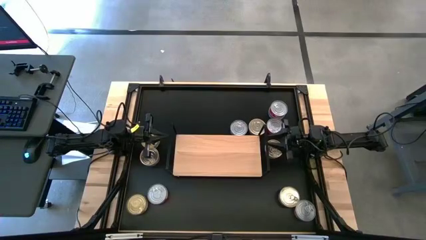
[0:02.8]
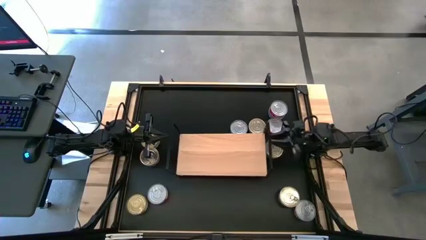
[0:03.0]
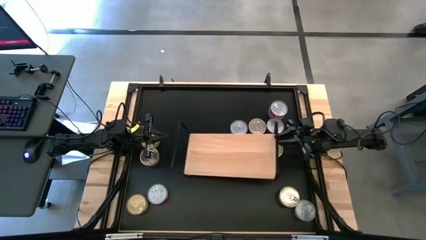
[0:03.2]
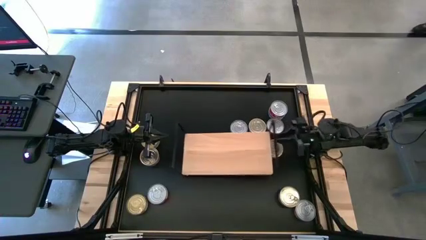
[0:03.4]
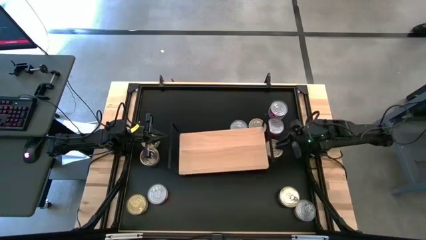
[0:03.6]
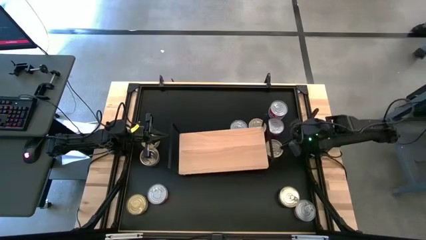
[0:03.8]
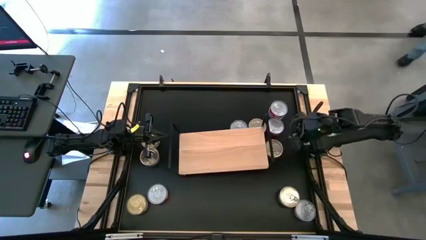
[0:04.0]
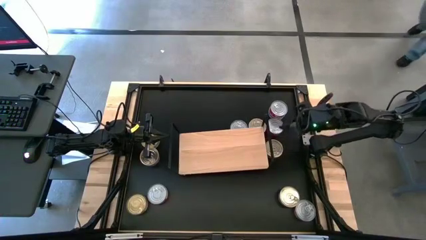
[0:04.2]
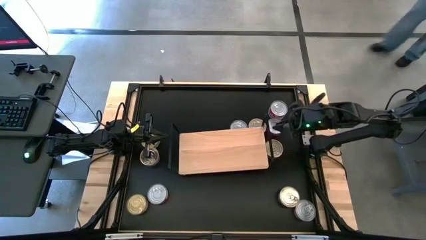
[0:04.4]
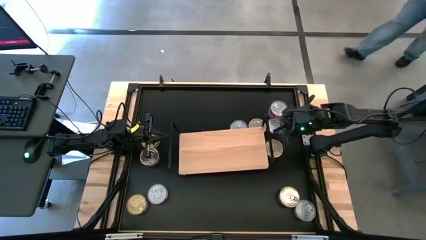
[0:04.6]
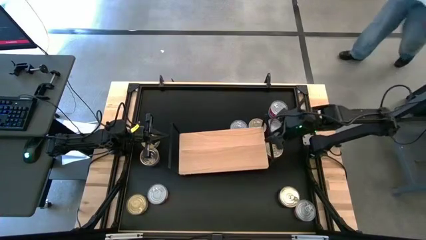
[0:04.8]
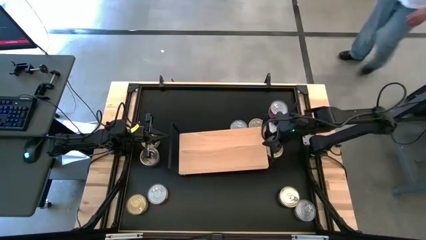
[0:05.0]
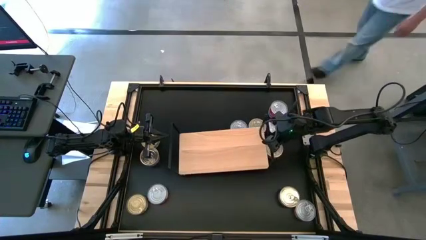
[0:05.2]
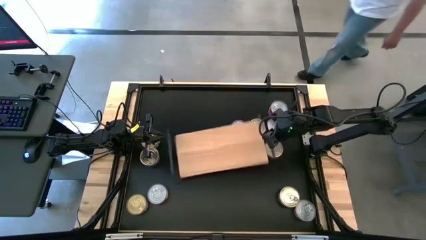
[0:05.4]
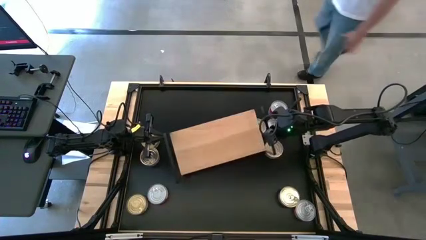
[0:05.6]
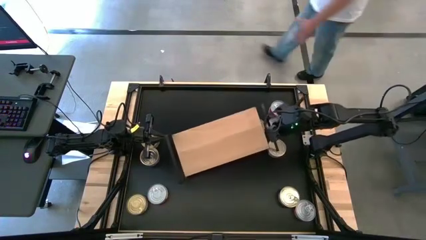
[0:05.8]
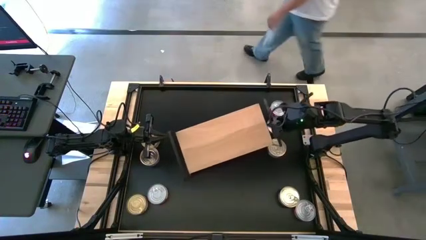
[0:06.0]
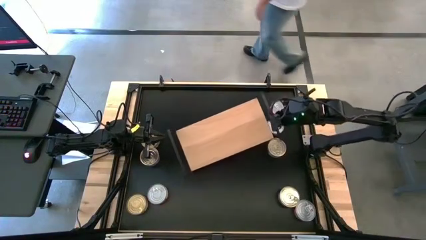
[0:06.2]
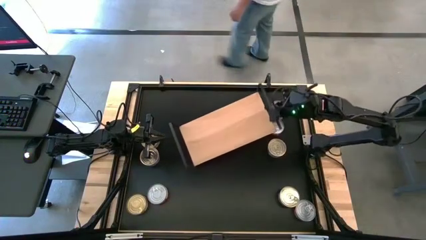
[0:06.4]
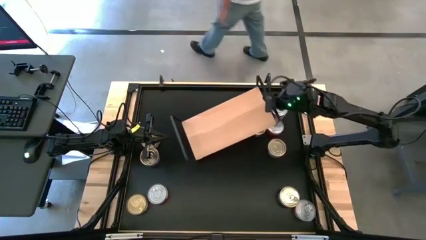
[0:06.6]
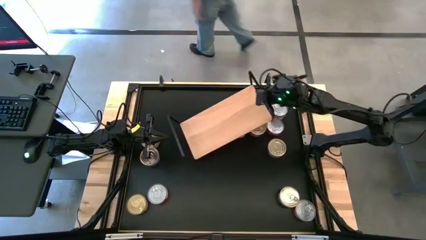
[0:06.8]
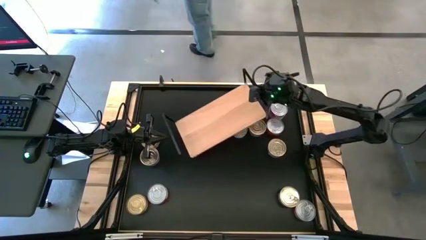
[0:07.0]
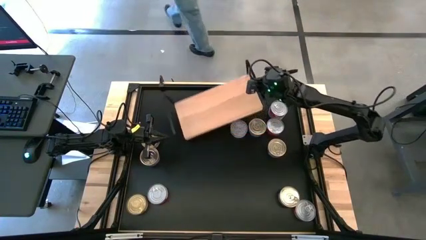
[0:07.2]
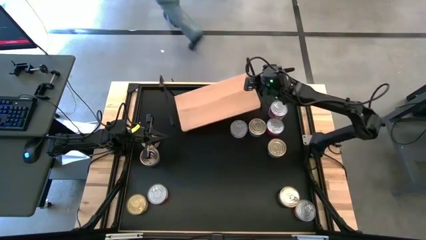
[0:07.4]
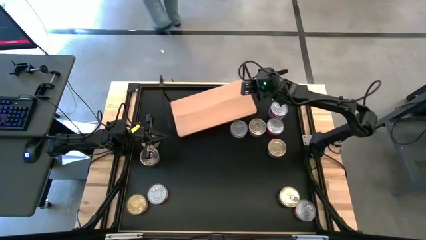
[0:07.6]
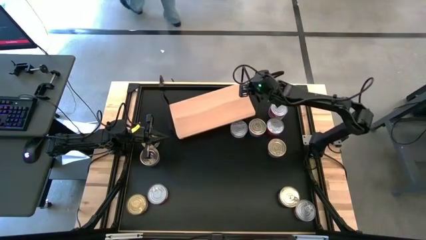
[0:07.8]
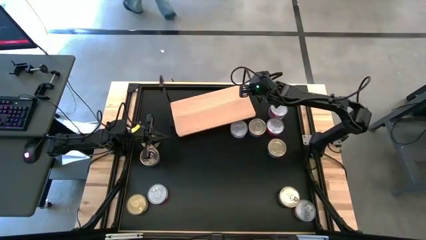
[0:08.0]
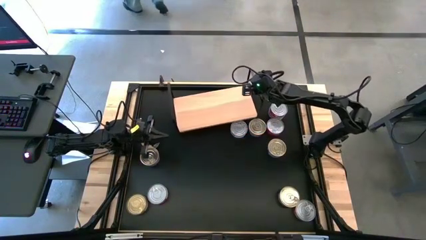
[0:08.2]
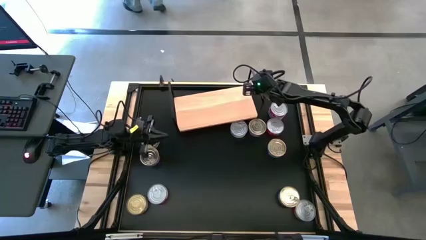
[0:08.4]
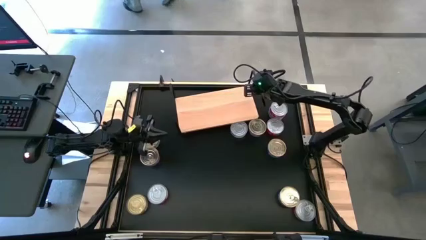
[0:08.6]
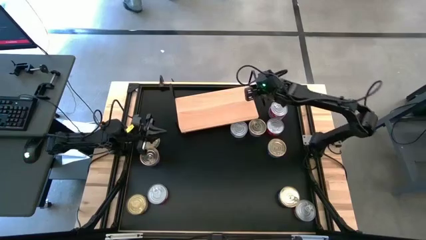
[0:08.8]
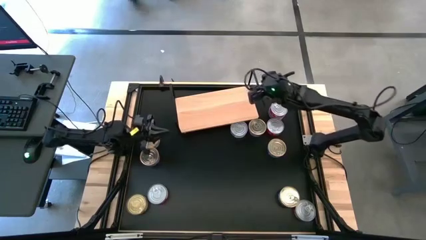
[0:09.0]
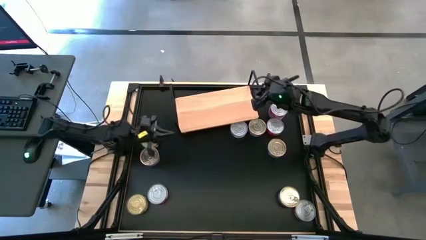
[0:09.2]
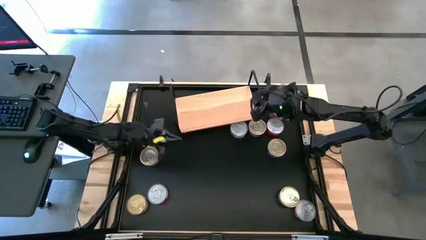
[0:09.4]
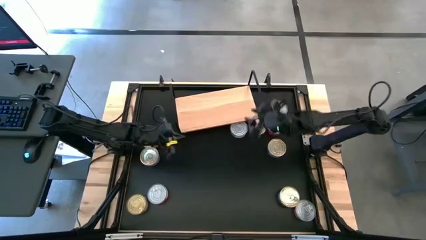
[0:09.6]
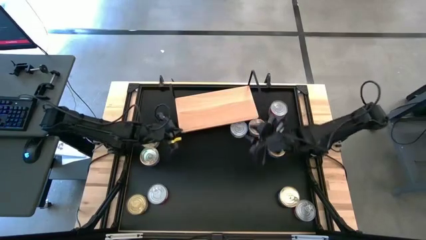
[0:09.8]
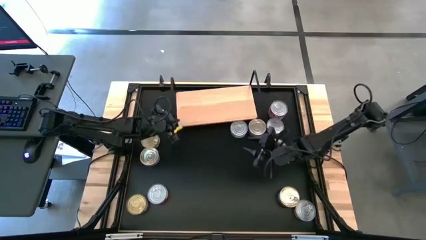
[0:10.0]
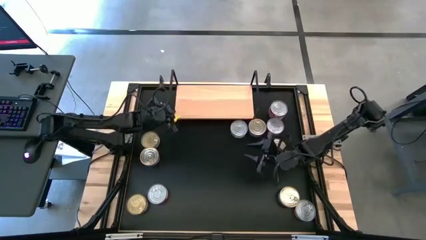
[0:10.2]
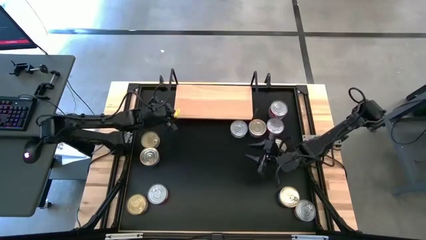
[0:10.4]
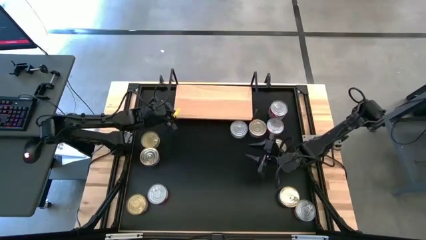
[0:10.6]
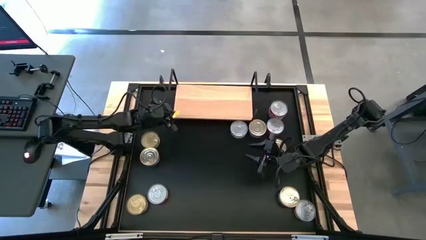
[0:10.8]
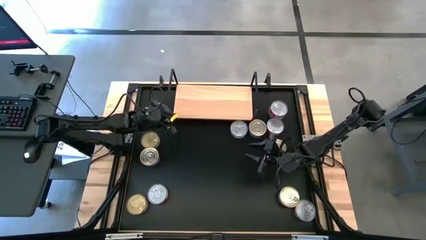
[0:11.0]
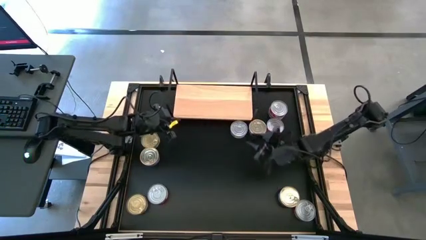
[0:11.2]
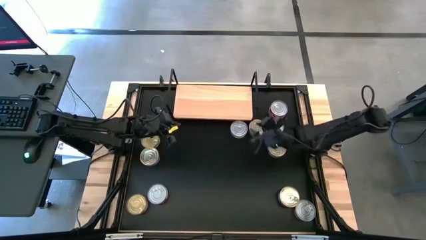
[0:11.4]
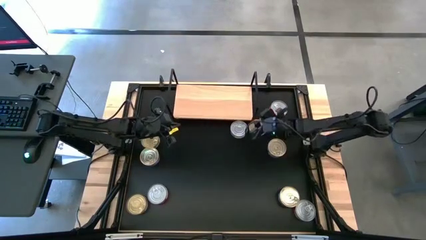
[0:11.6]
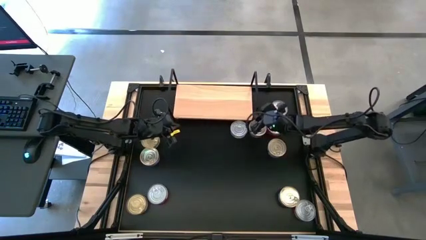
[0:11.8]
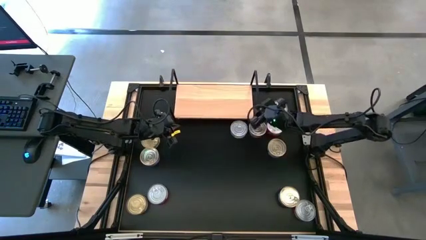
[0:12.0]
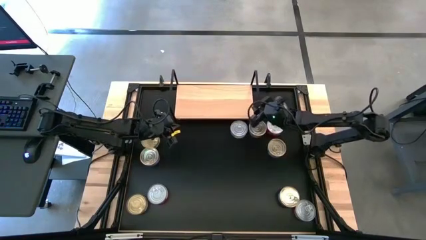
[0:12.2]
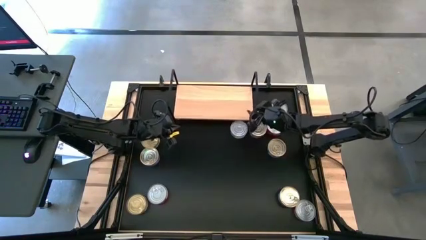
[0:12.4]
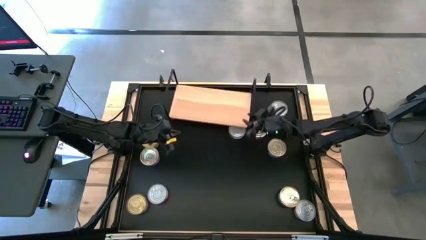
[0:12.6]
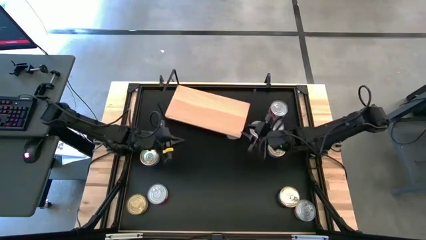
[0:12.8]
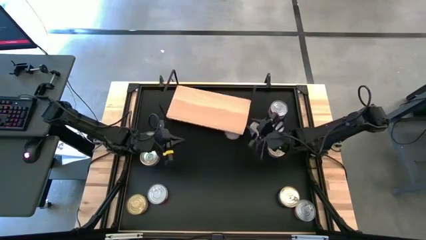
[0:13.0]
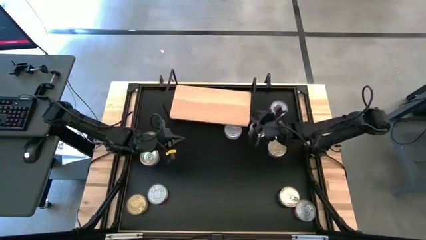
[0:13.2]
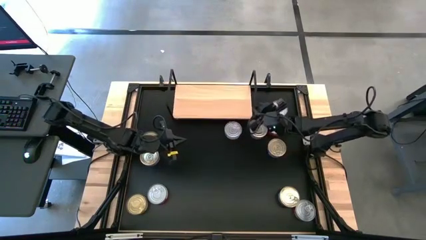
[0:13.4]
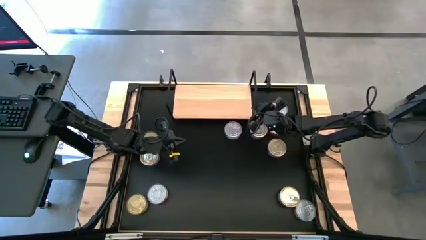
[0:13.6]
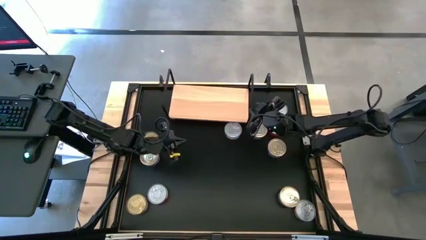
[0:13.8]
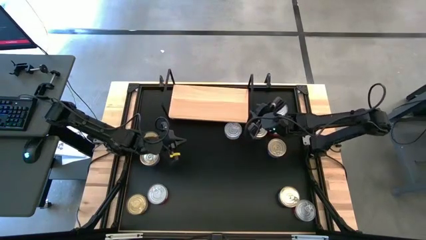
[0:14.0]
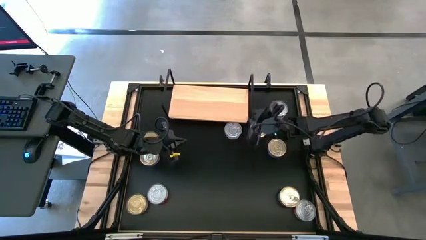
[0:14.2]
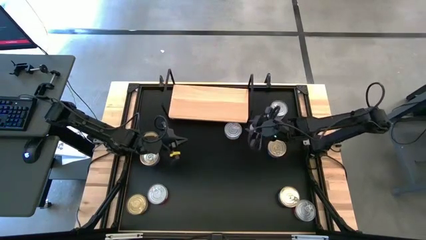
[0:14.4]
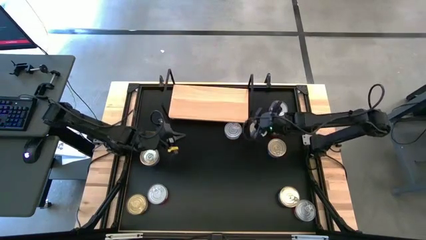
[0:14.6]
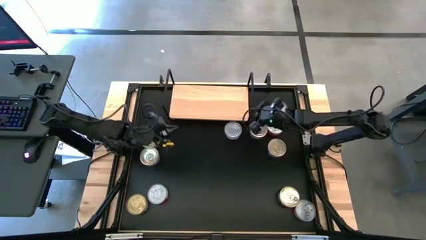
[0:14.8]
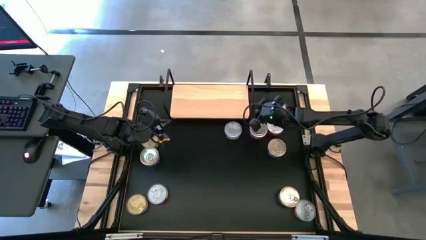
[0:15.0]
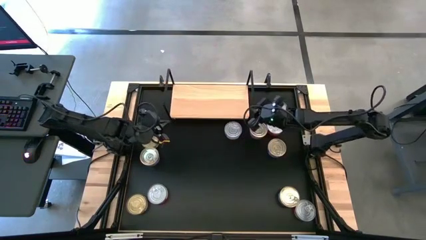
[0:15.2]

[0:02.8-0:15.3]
Task: Stack canned seafood by type on shelf
Move the shelf to the top center of the table

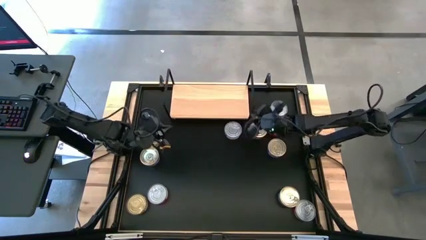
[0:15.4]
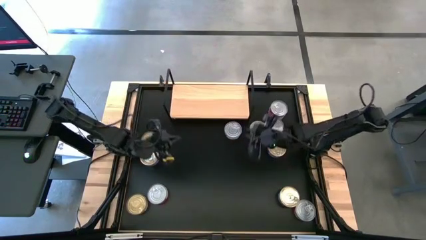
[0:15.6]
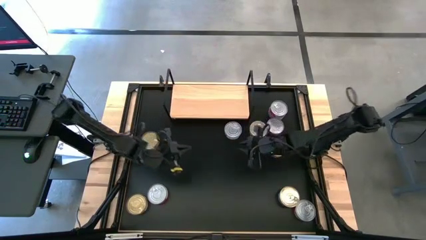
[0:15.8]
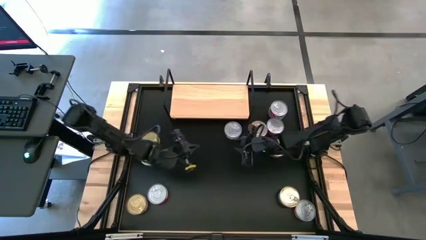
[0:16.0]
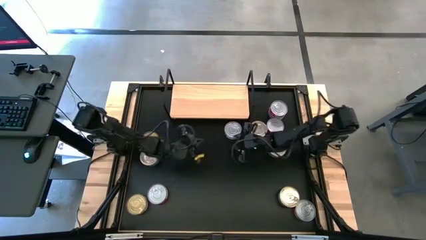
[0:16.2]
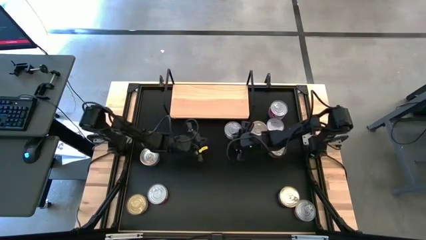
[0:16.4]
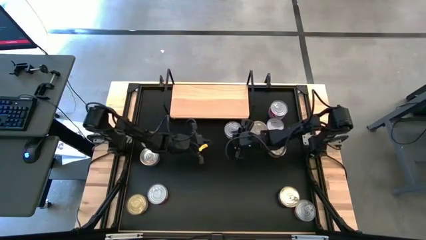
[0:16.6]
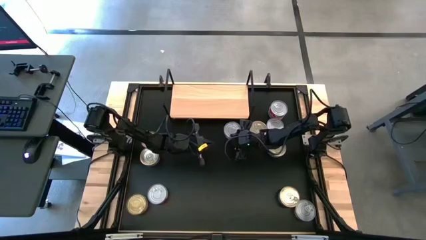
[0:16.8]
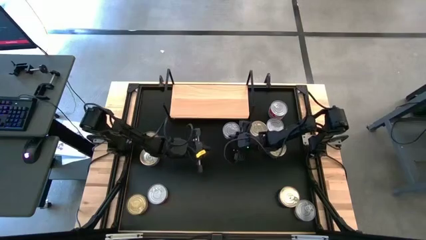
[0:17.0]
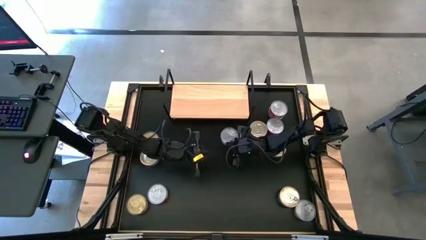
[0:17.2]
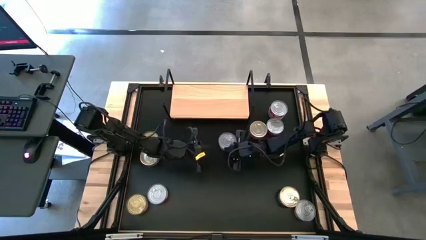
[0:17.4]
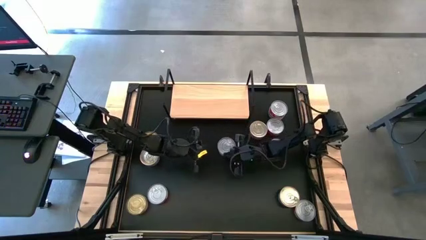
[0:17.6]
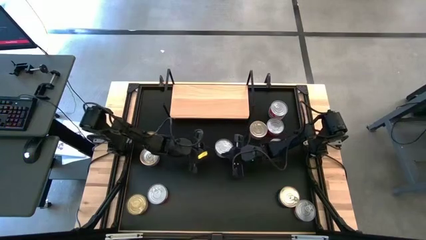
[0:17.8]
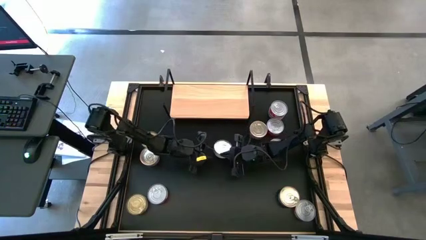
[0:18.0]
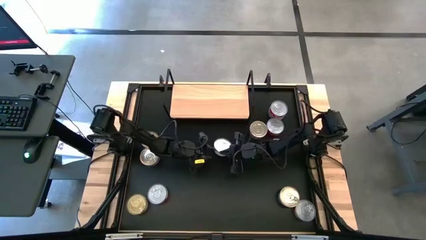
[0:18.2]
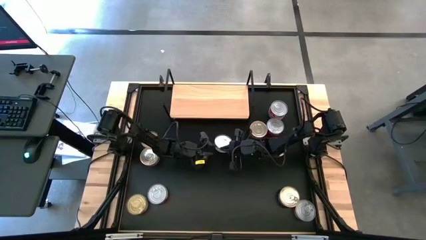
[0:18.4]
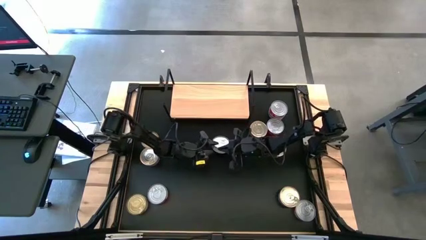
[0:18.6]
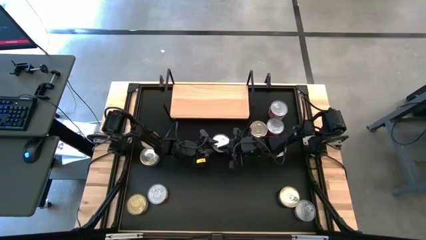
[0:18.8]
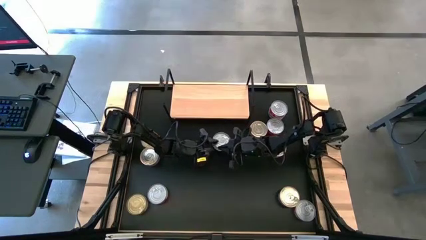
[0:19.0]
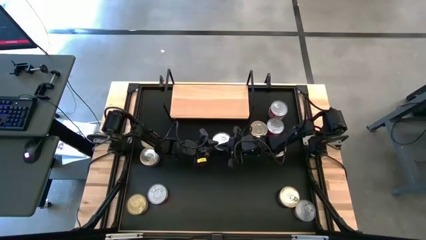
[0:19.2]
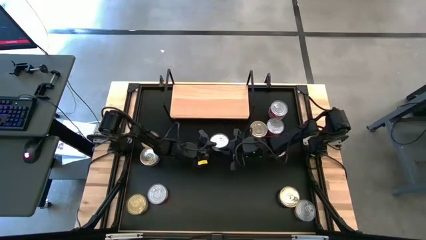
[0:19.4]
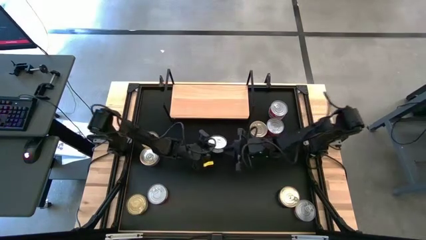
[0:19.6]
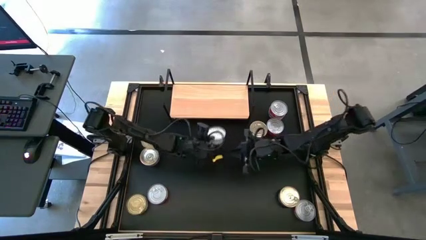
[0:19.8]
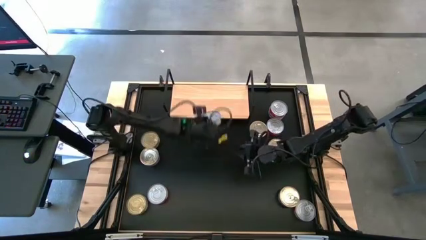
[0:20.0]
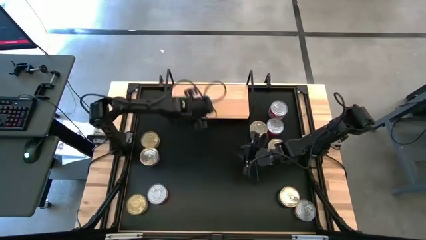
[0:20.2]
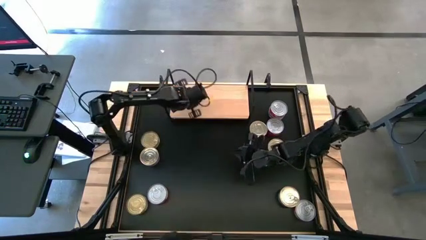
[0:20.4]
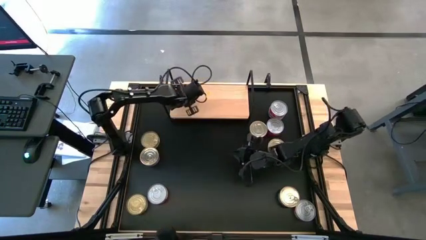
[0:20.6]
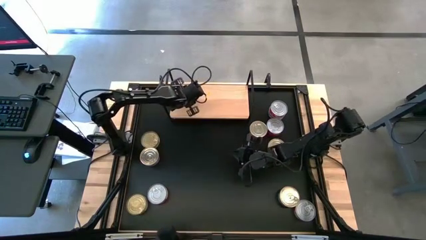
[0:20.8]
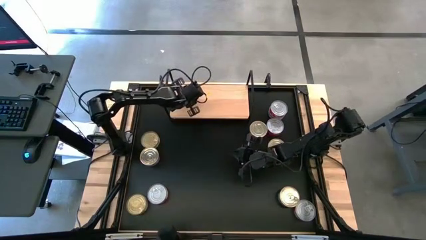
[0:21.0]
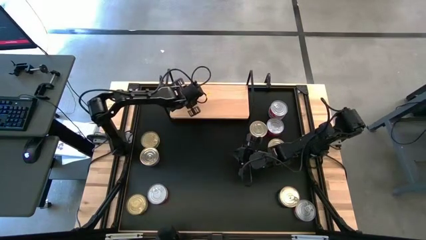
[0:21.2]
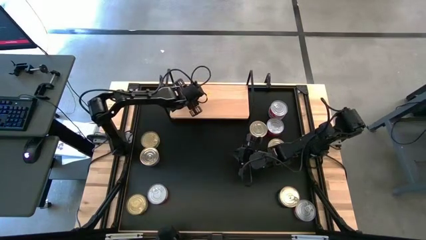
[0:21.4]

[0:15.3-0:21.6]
Put the green tuna can on the shelf
